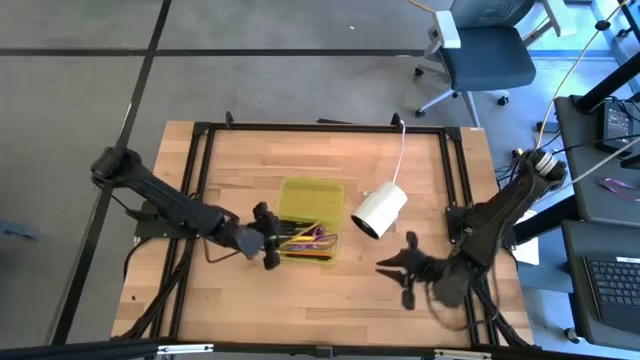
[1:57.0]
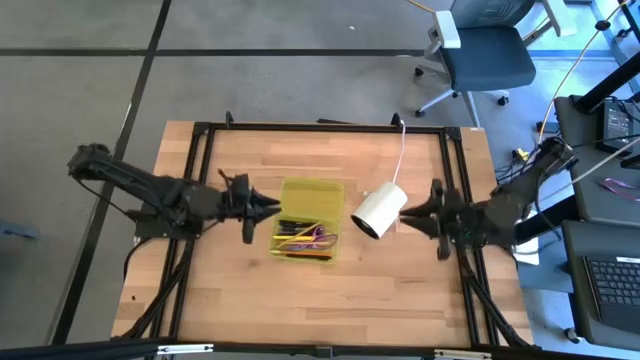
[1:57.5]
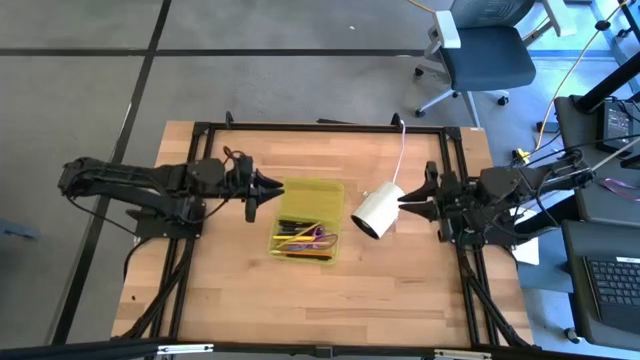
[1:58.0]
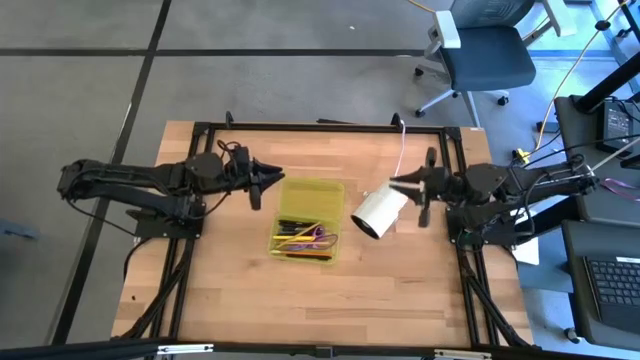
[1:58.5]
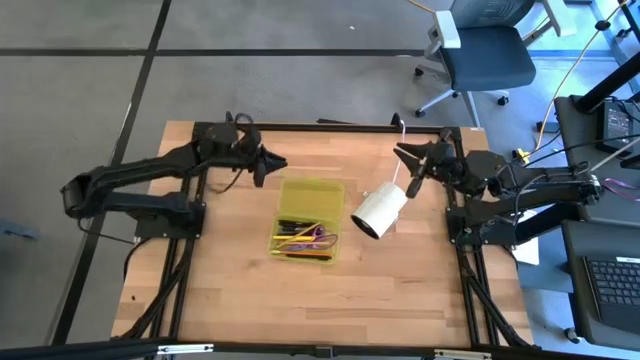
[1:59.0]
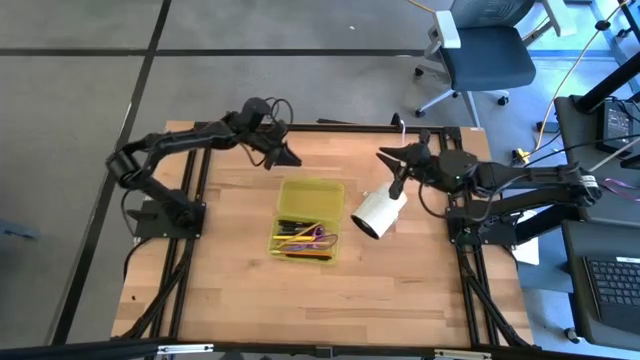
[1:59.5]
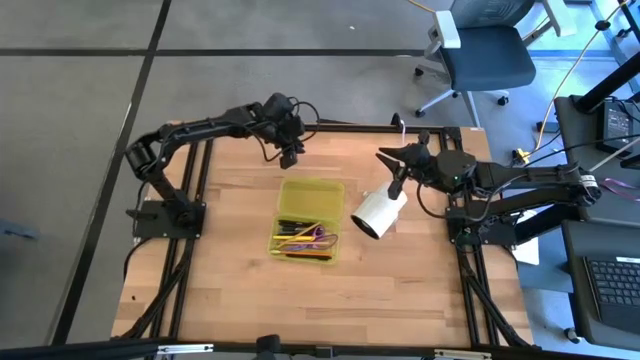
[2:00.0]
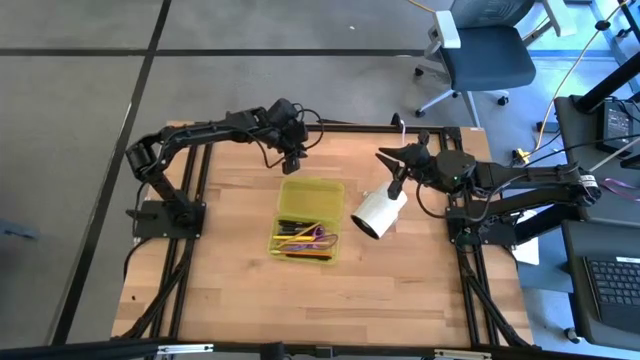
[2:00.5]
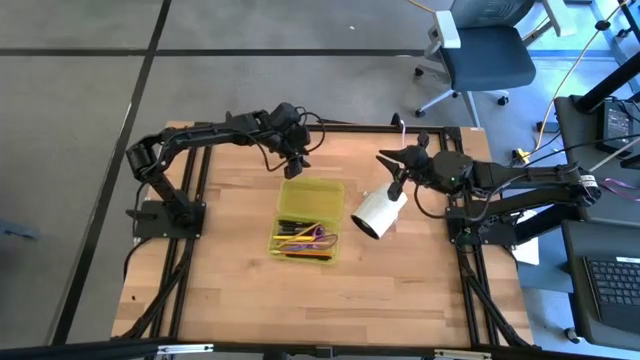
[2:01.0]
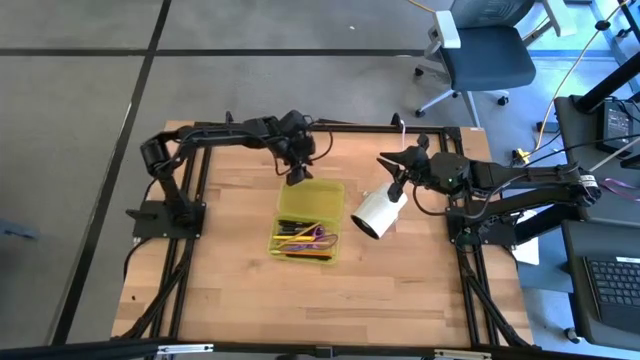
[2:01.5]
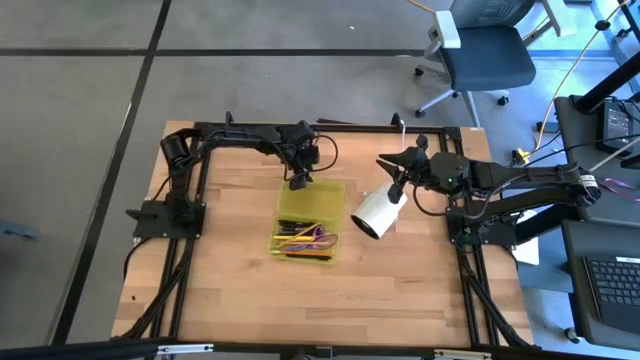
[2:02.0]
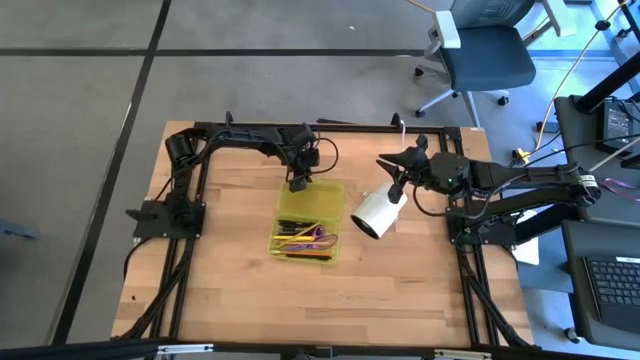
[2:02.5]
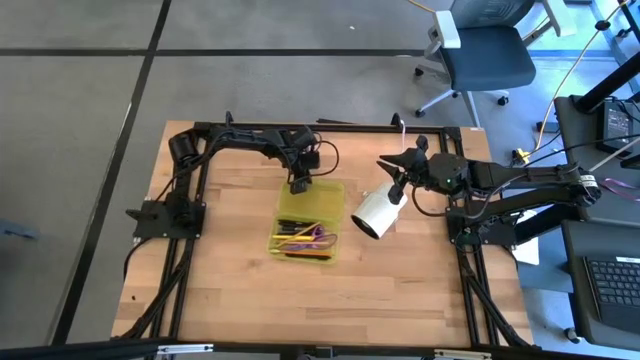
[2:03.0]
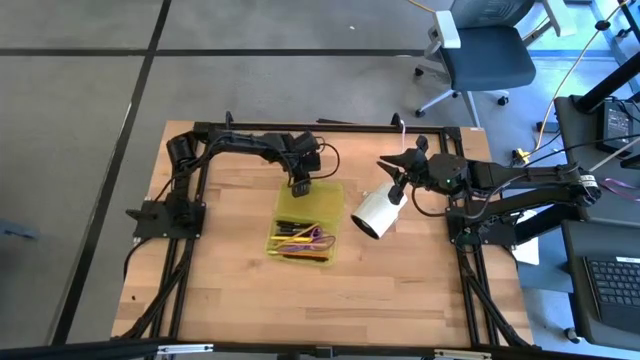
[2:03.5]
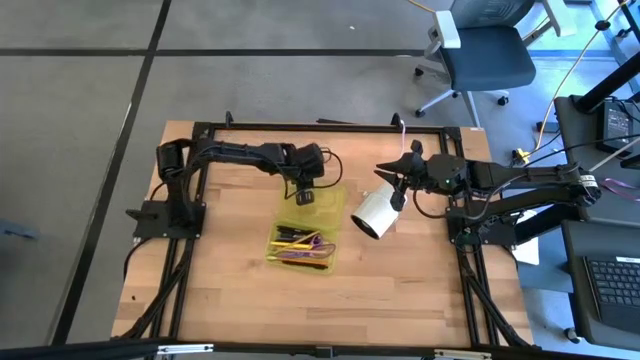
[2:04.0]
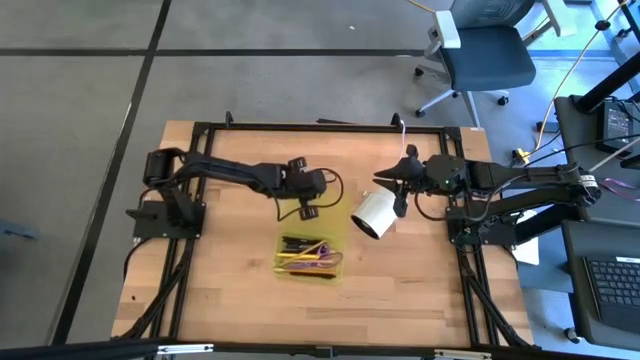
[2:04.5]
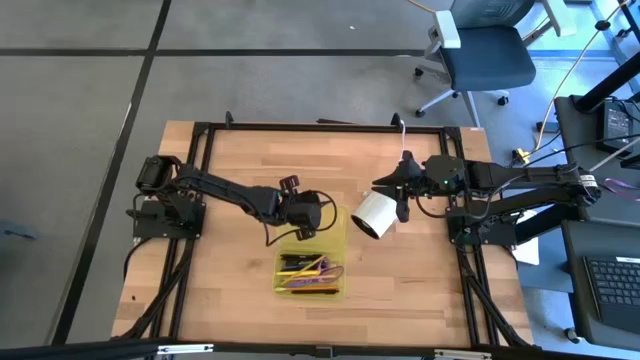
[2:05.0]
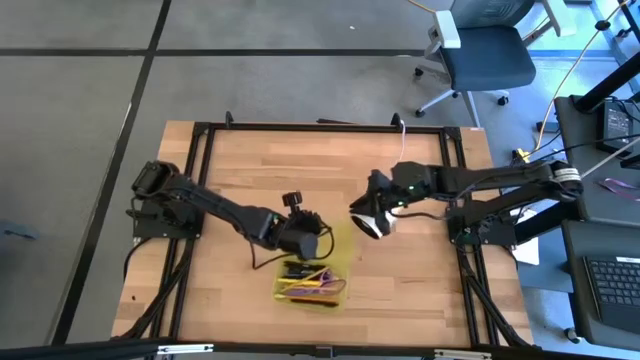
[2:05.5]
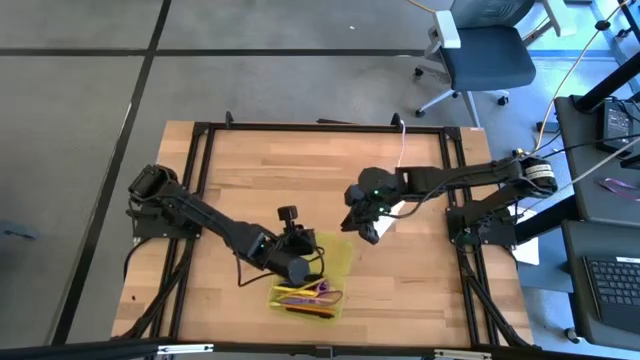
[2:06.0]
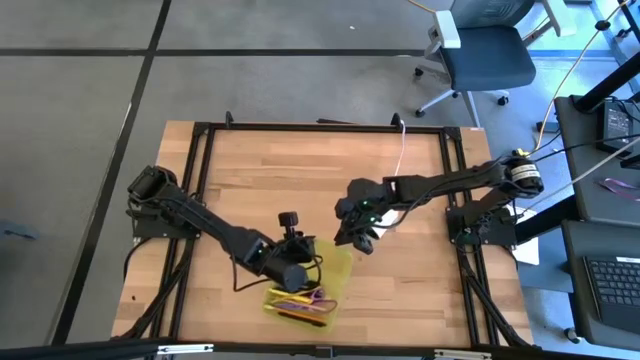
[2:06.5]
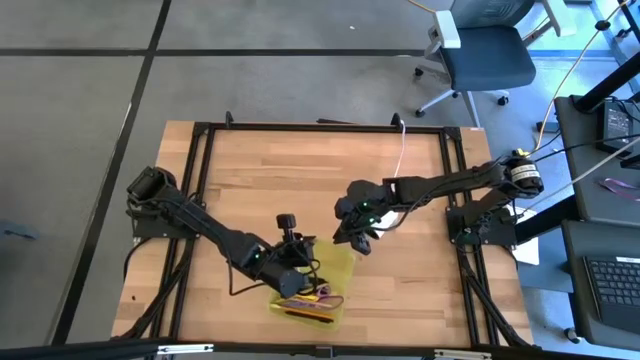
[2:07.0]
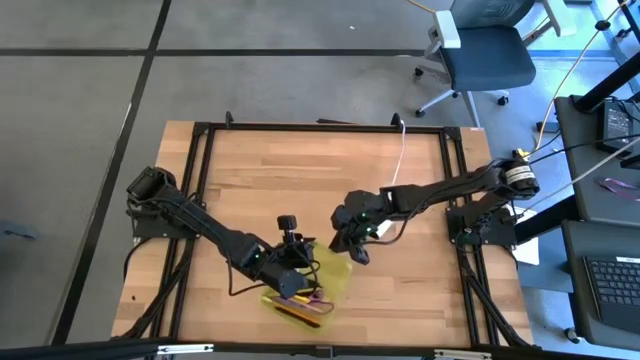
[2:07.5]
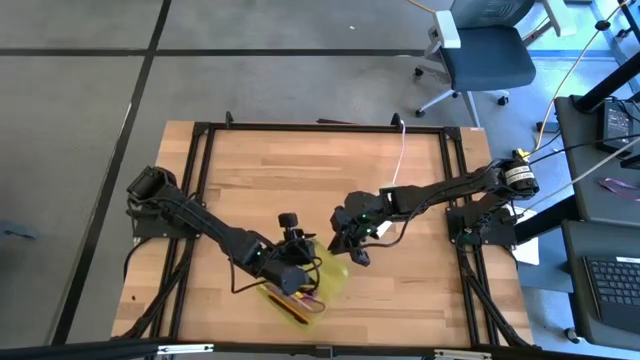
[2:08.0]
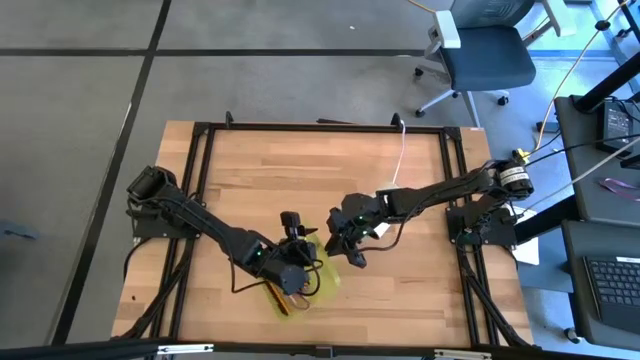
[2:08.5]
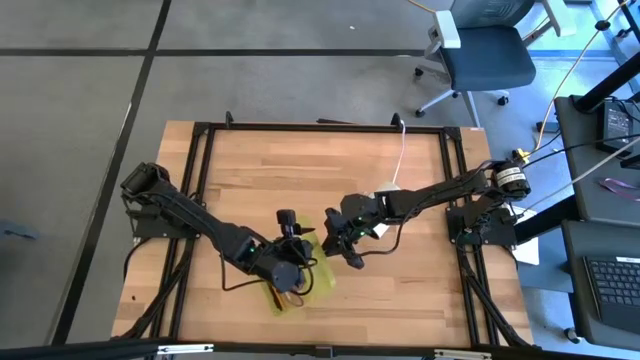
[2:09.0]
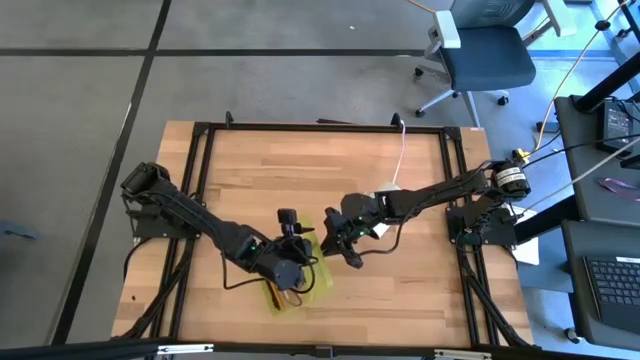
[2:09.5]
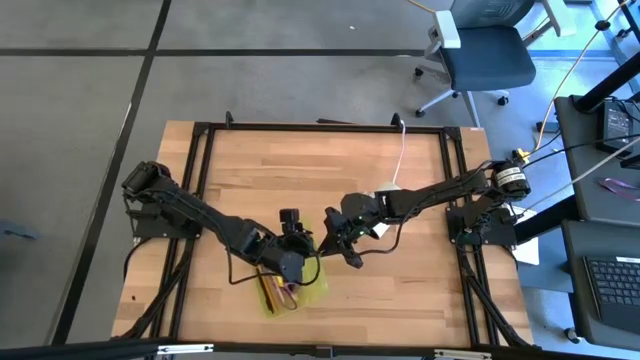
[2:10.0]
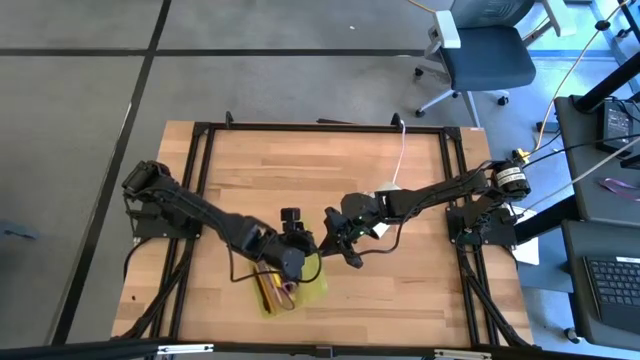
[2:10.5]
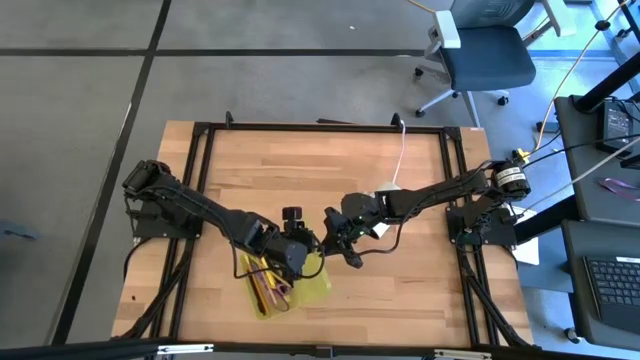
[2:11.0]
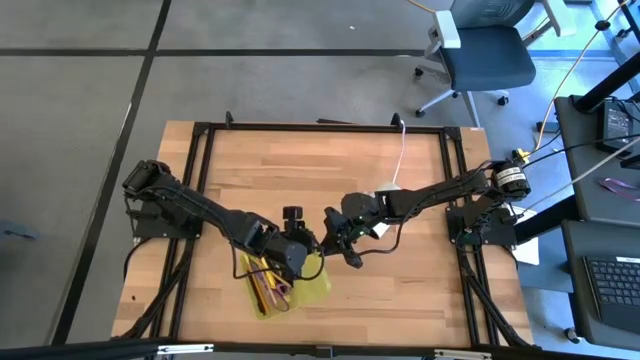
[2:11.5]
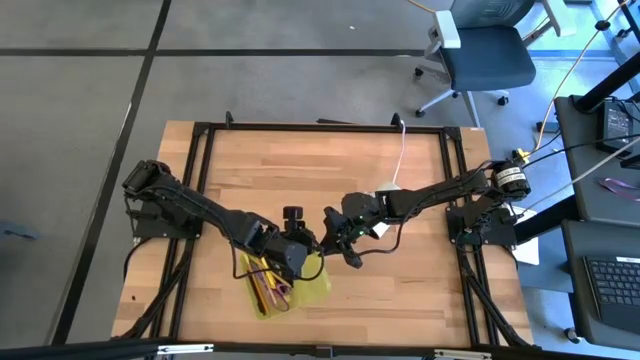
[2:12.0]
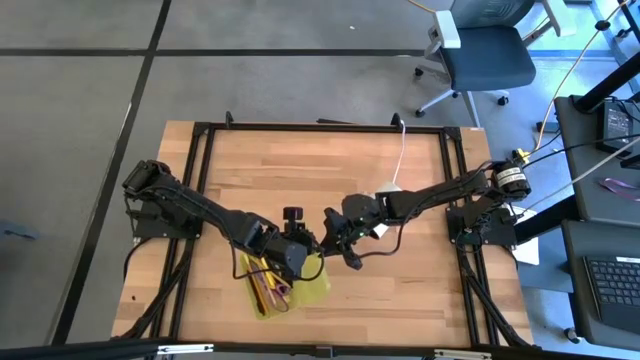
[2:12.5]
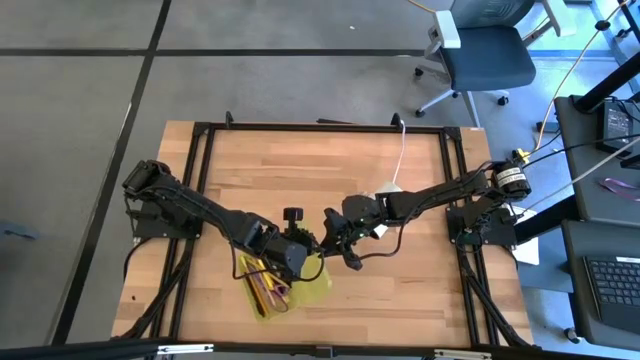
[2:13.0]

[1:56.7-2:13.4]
Task: Pick & place school supplies into a supply box
Close the yellow supply box

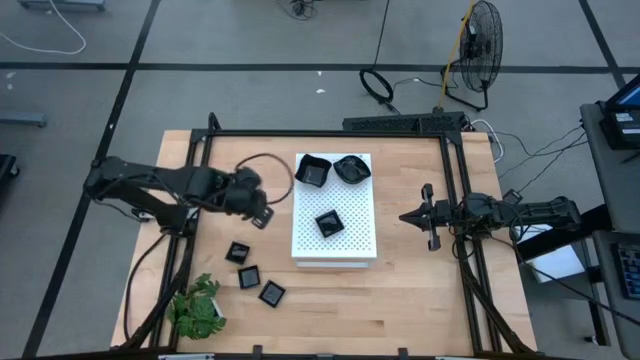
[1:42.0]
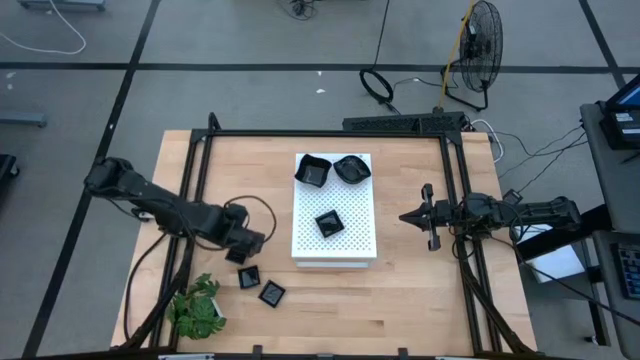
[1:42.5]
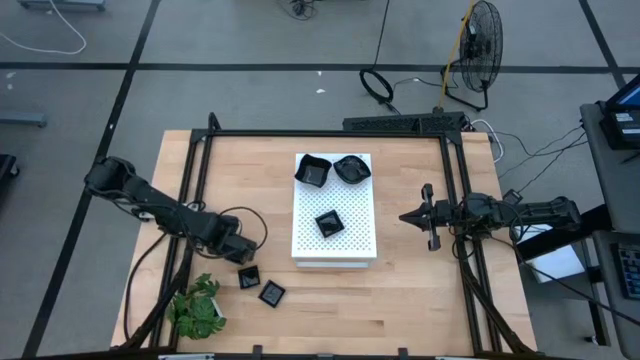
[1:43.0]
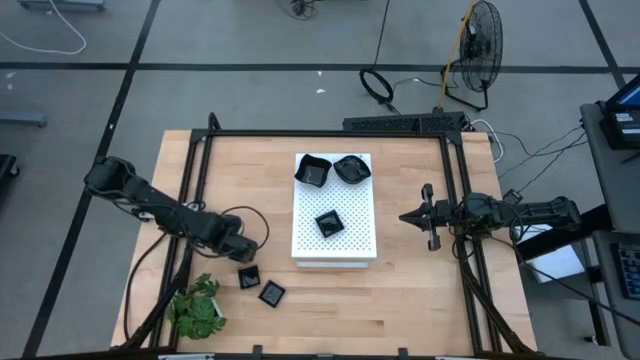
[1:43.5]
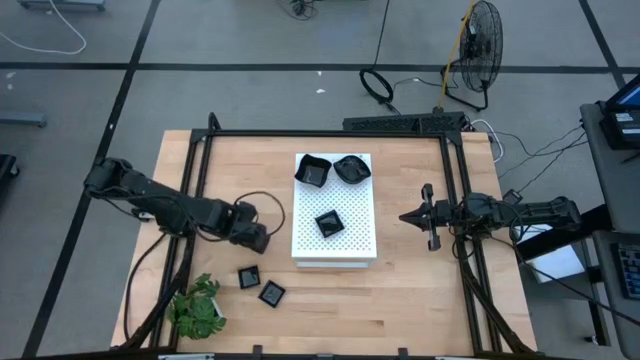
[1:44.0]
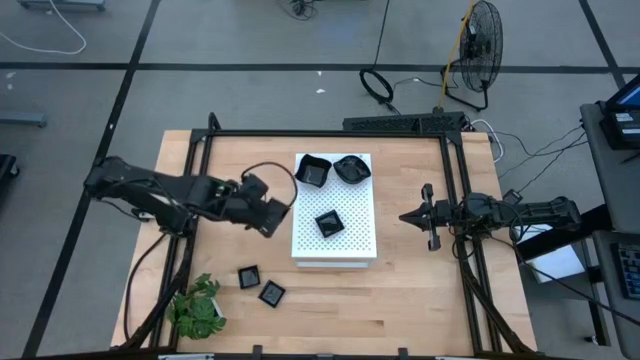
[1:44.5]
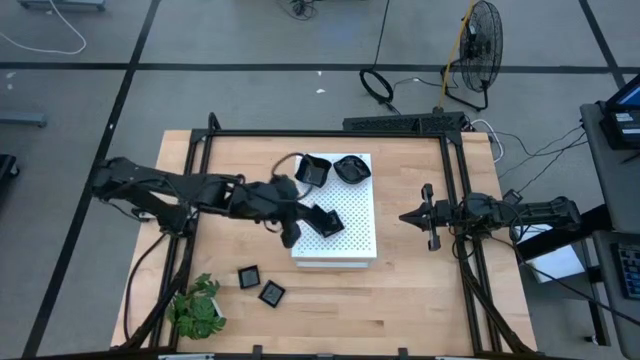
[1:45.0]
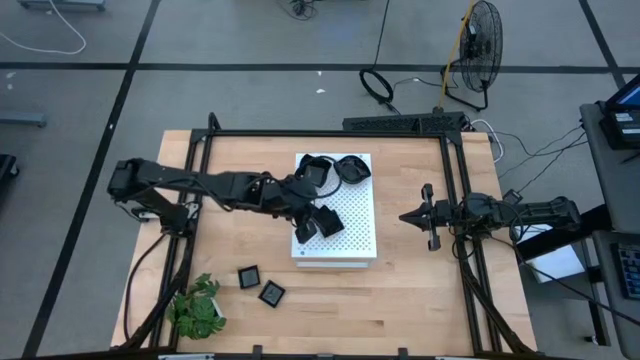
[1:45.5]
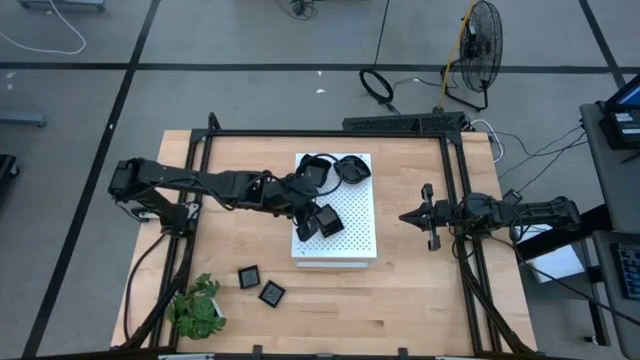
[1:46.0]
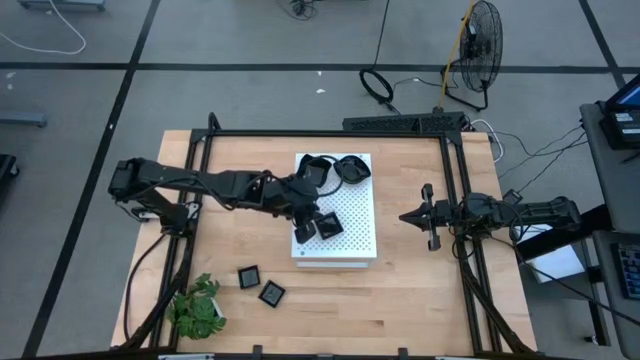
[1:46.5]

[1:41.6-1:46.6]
Task: Pick & Place Mini shaped plates
Stack the black square plate on top of the other black square plates on the shelf
